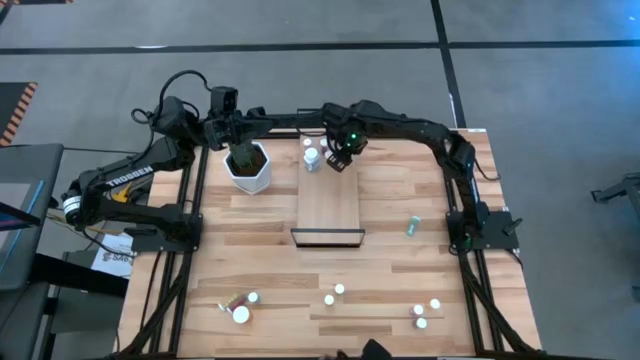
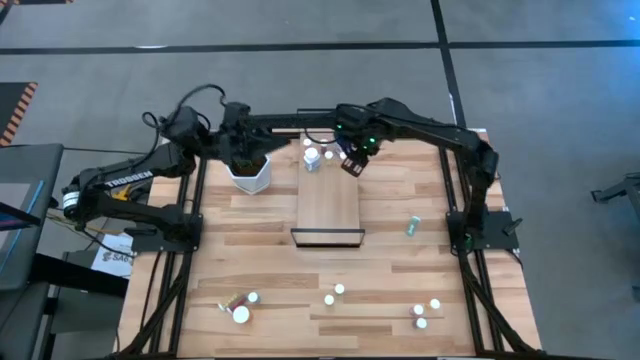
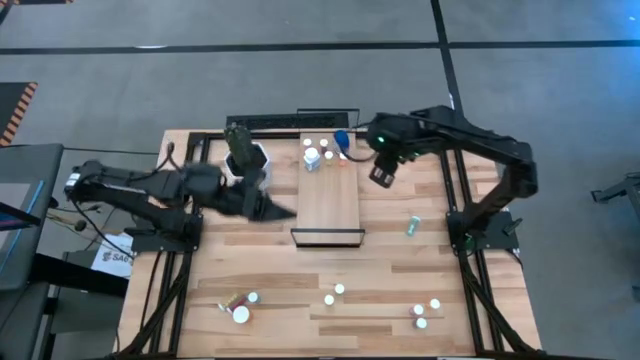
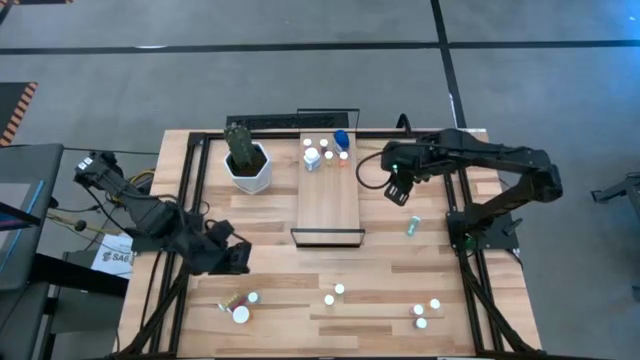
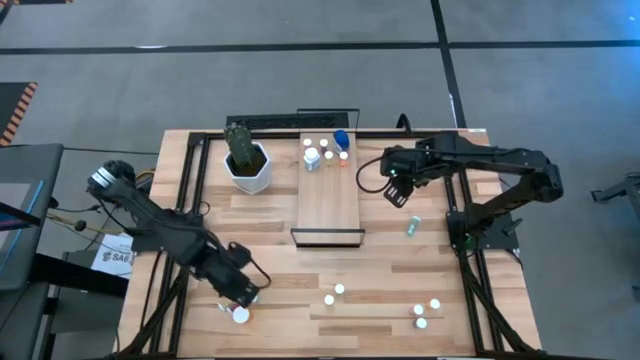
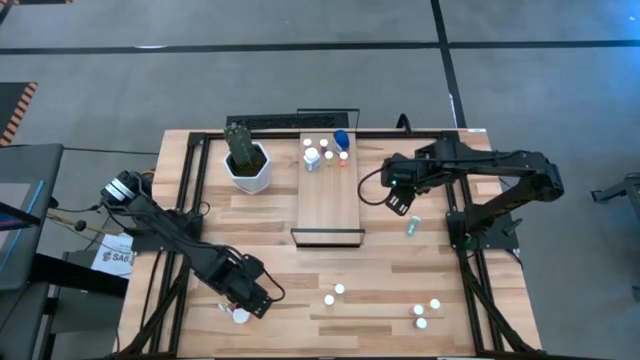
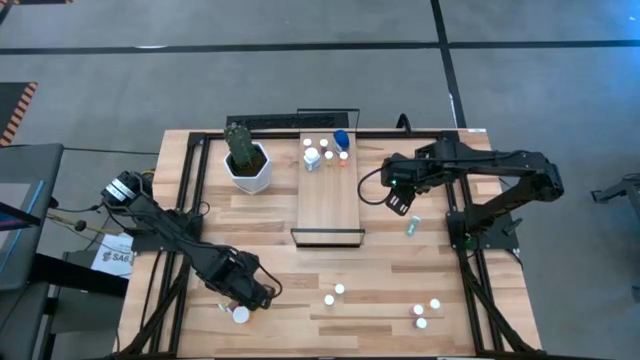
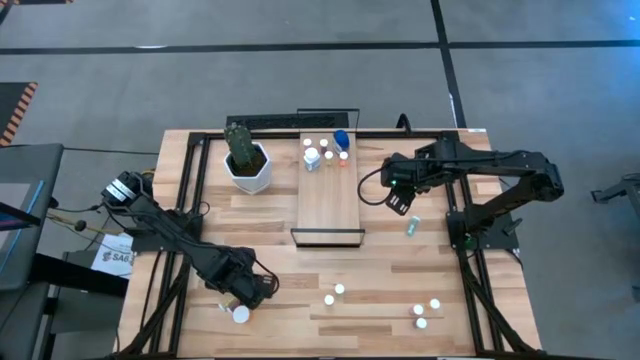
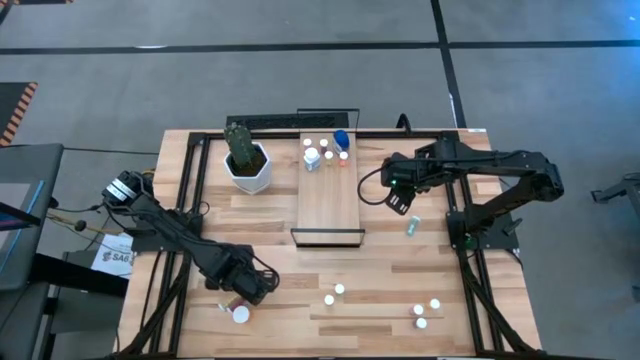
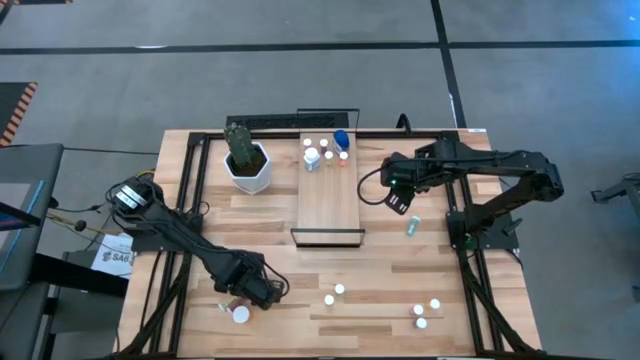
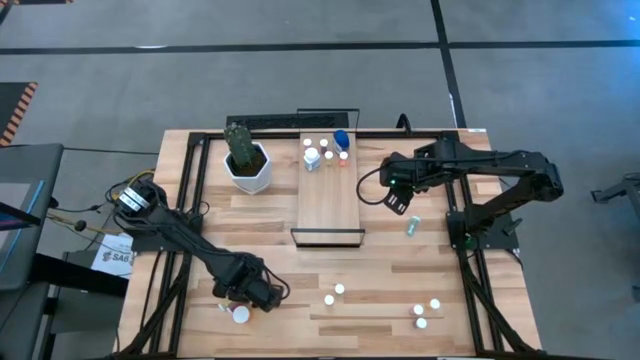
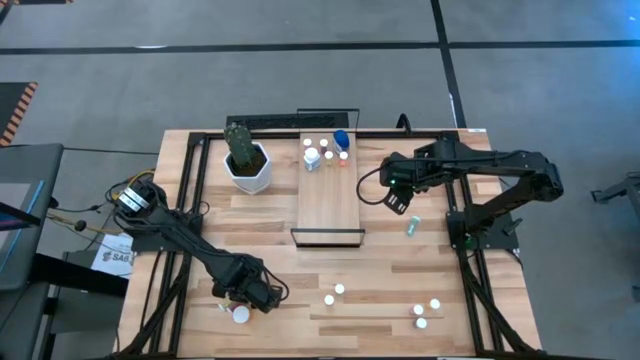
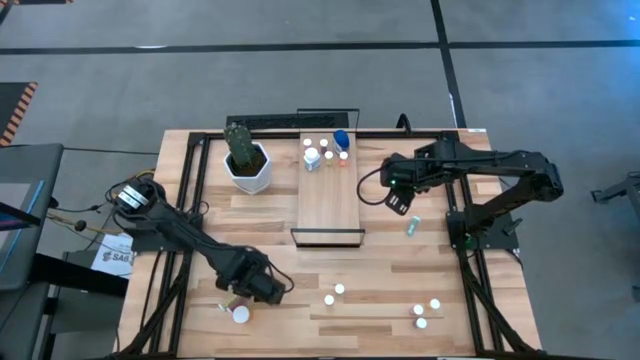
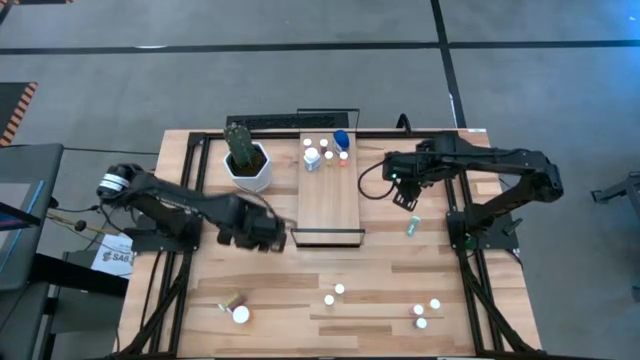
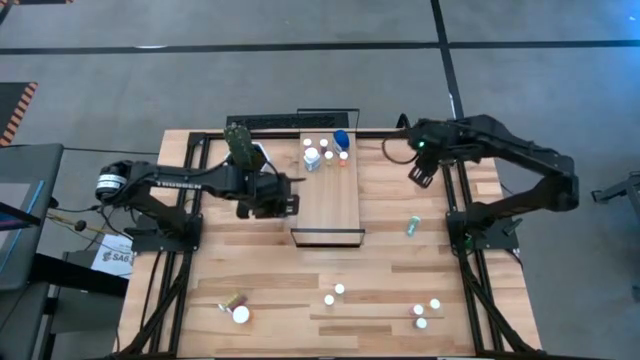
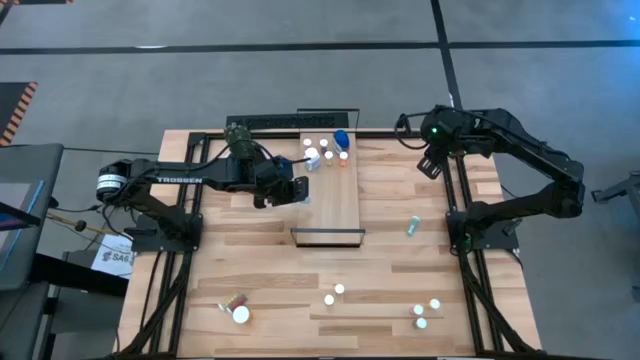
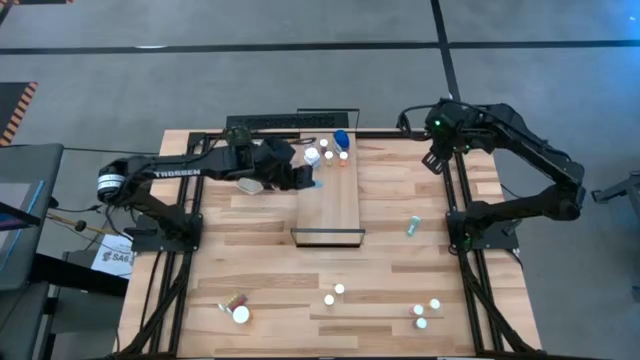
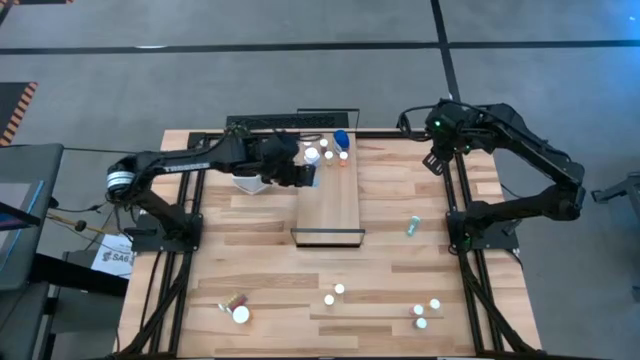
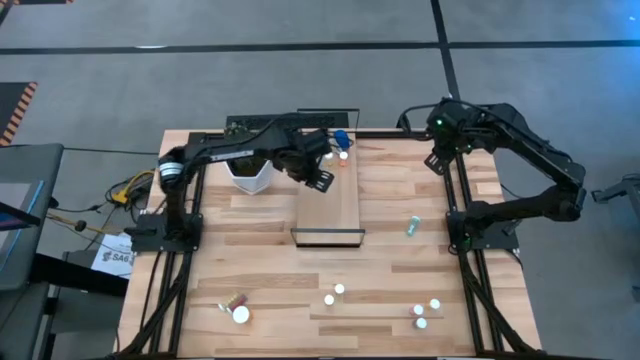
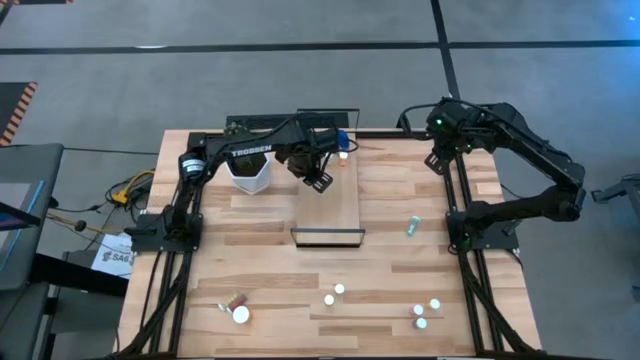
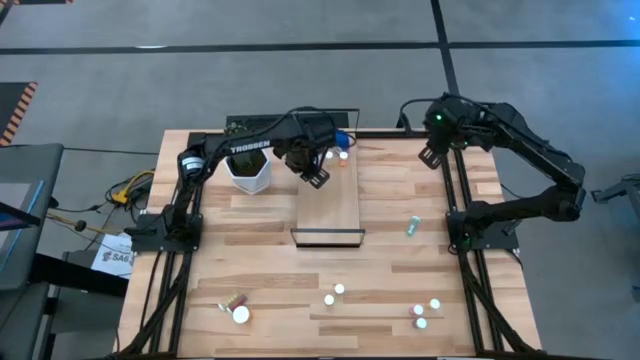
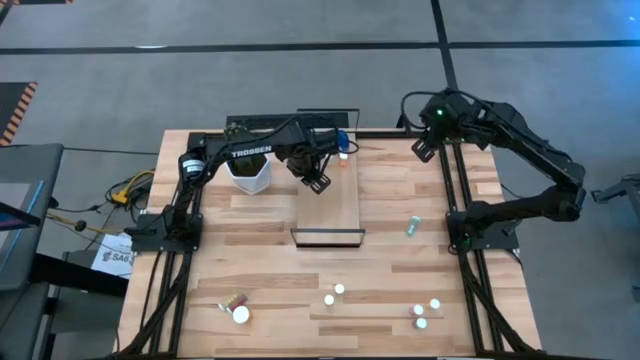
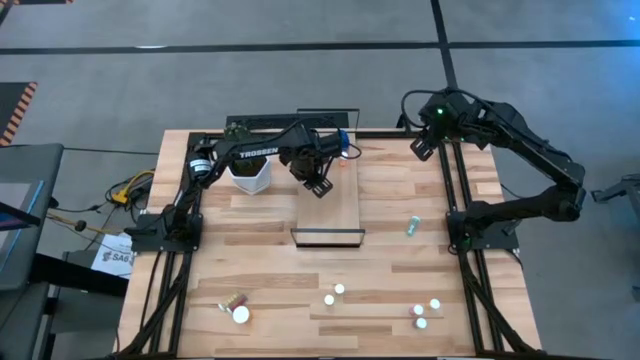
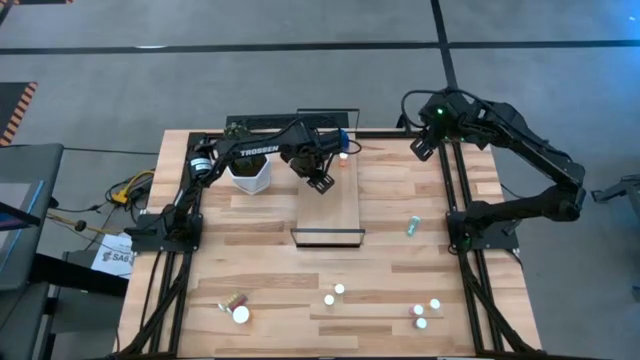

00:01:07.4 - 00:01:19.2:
Task: Pick and place medicine bottles onto shelf by color
Put the blue pill bottle on the shelf

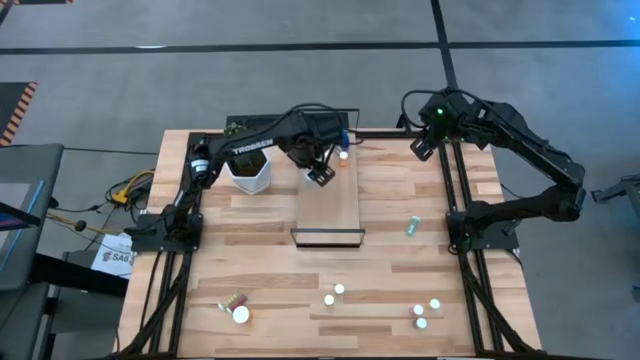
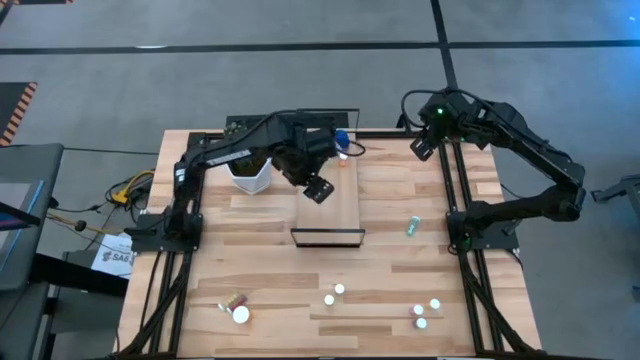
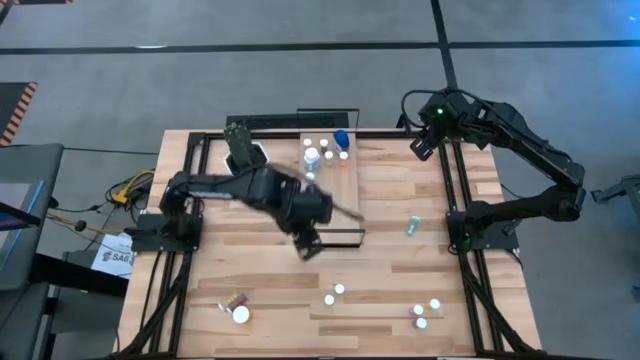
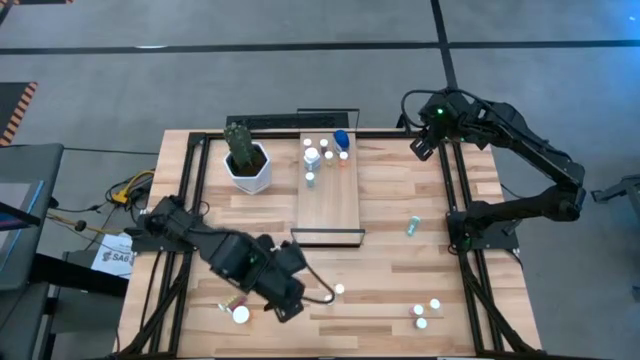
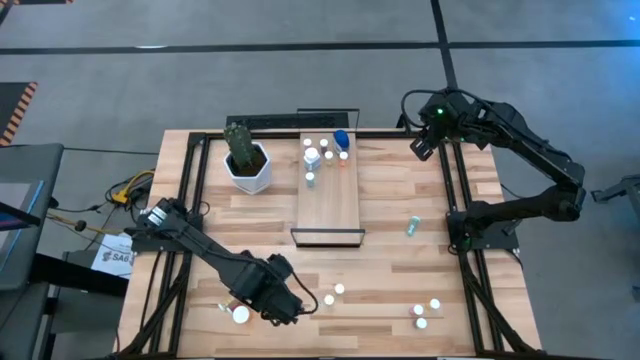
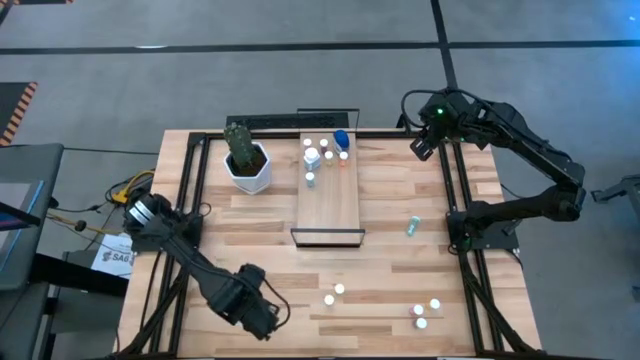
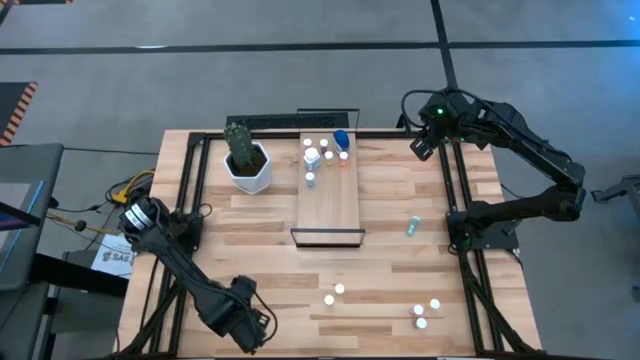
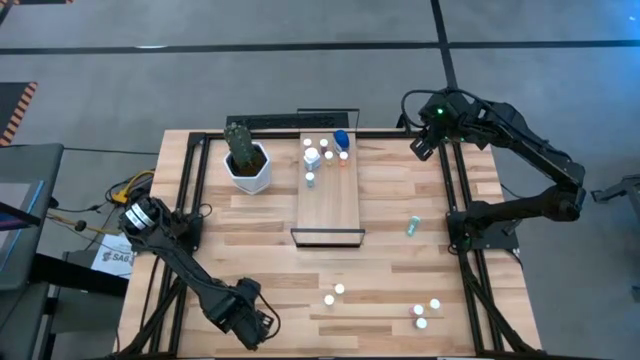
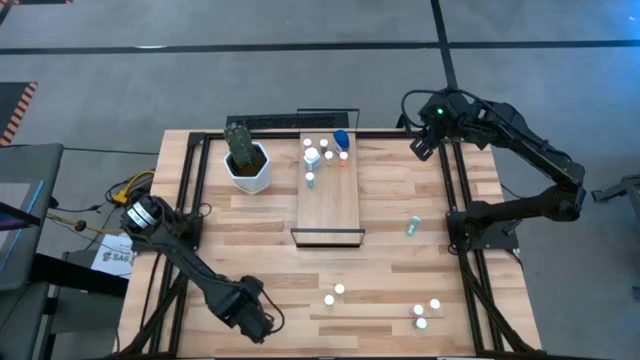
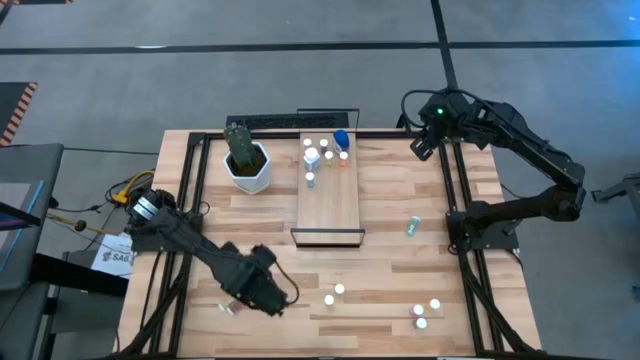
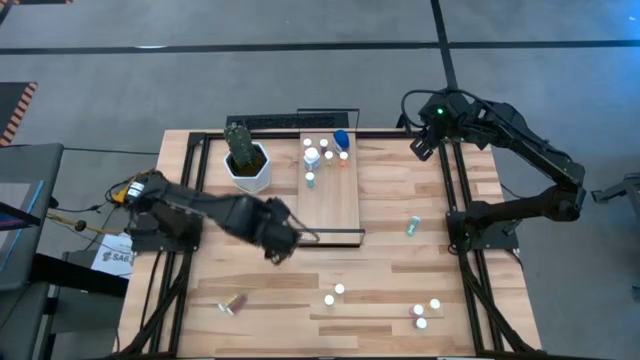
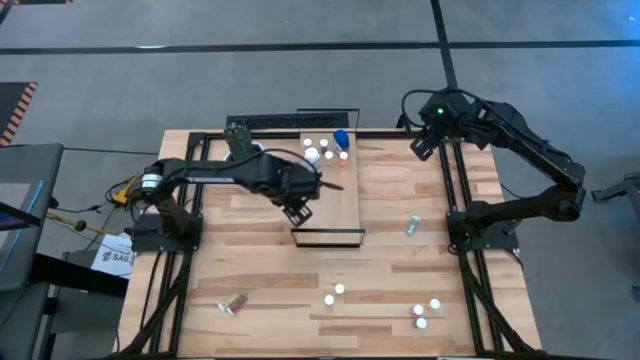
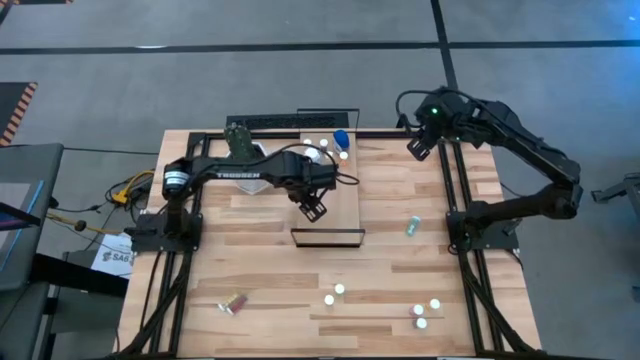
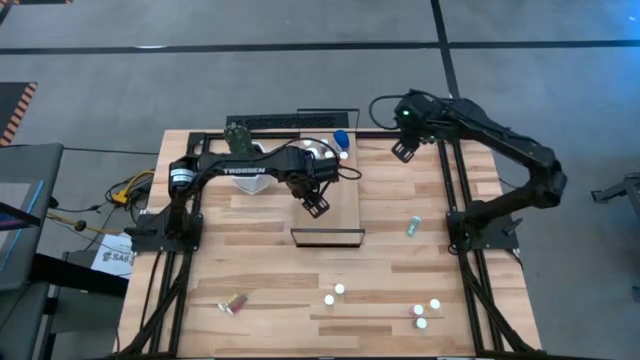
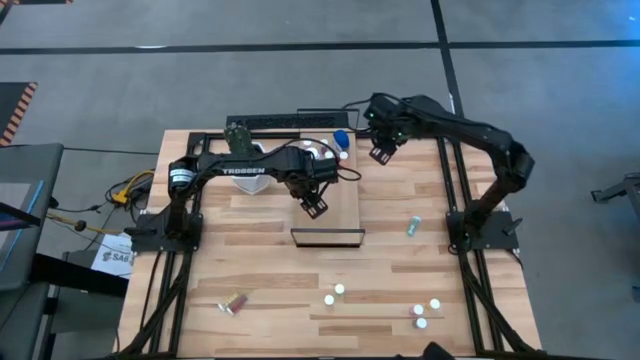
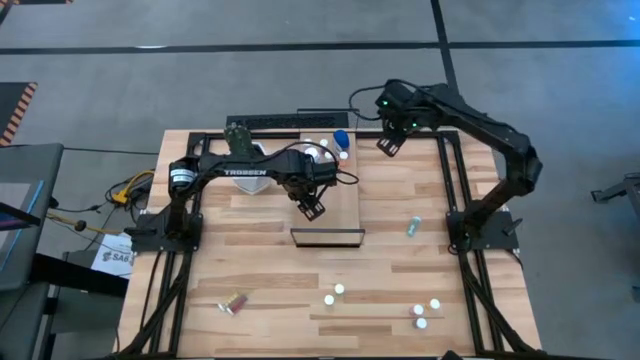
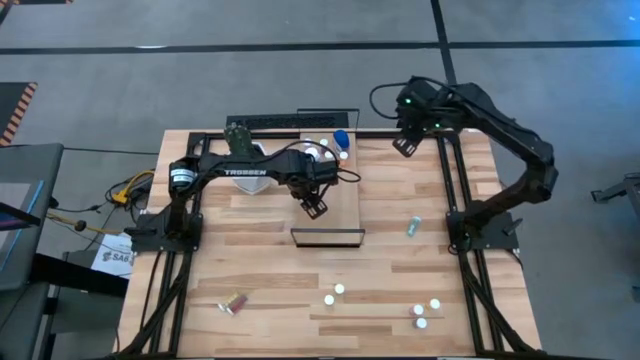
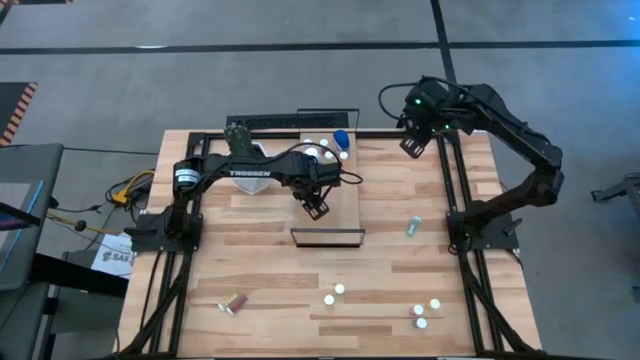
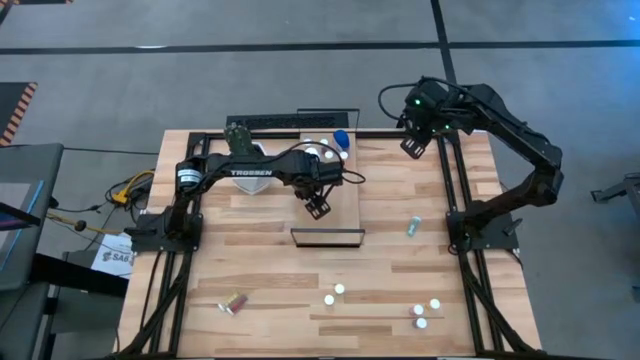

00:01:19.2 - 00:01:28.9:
Put the big orange pill bottle on the shelf

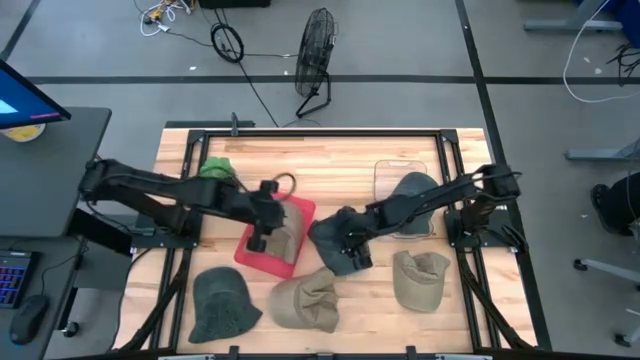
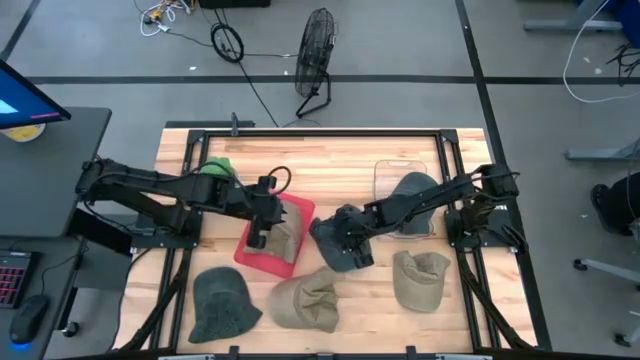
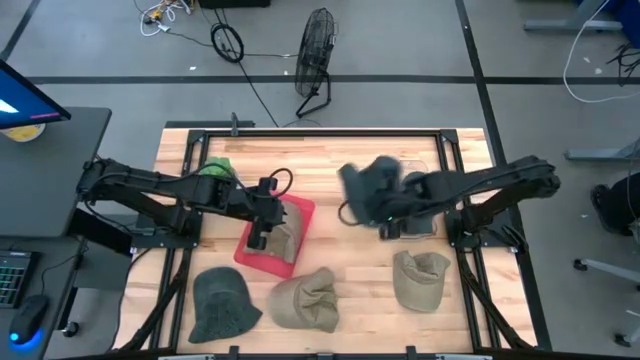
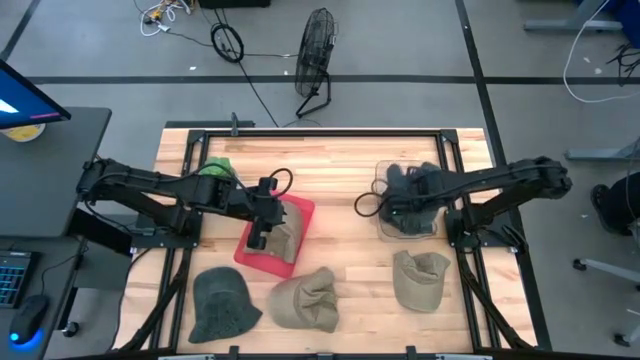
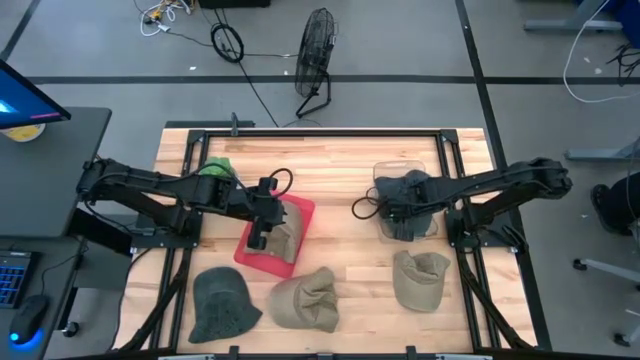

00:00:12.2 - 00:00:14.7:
Task: Pick & Place hat
Put the top black cap into the transparent bin
